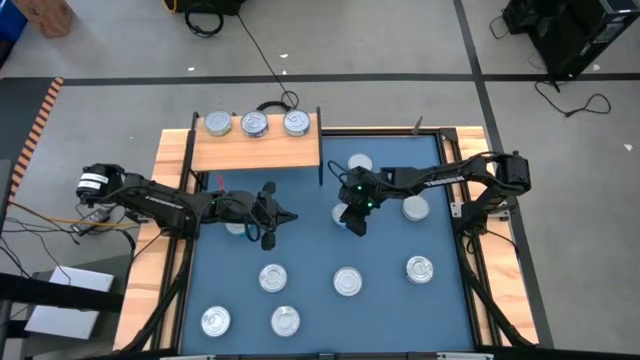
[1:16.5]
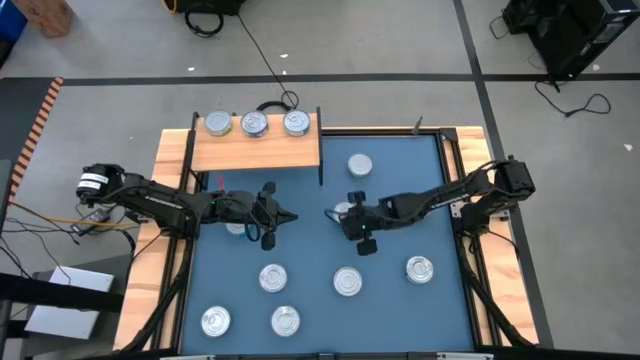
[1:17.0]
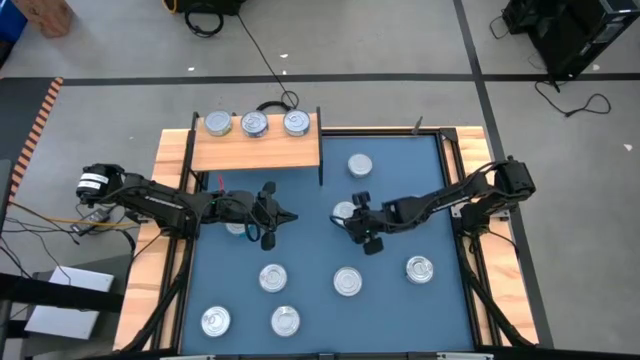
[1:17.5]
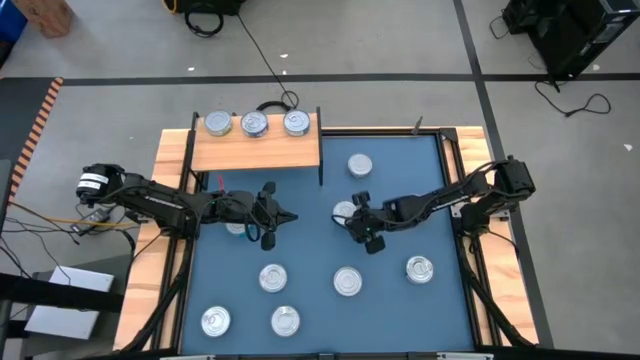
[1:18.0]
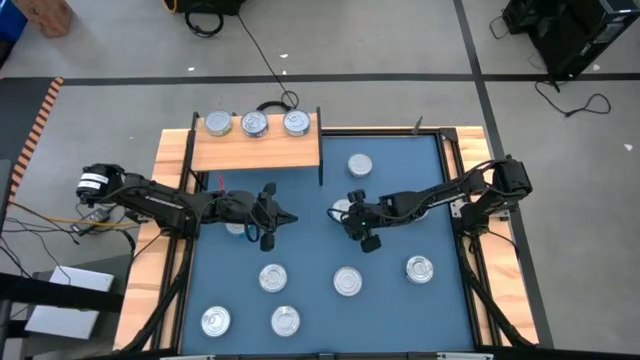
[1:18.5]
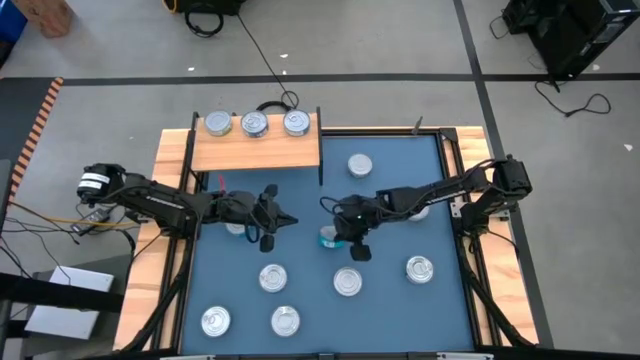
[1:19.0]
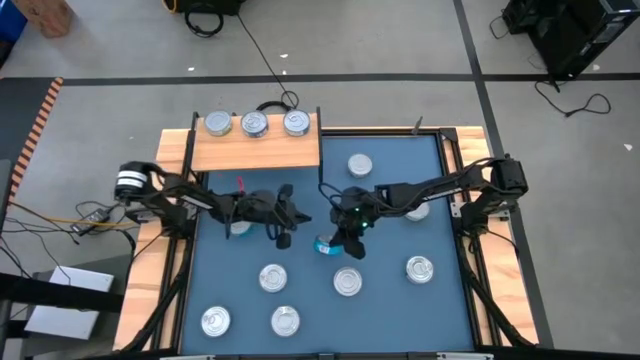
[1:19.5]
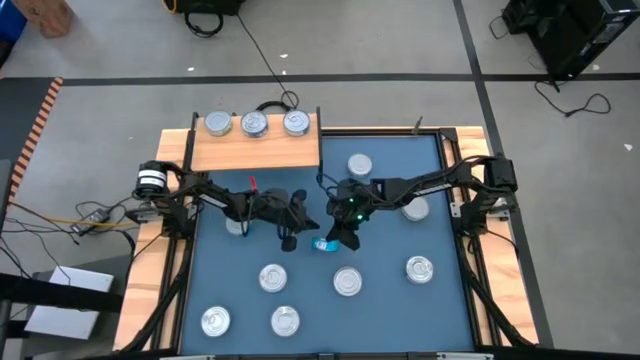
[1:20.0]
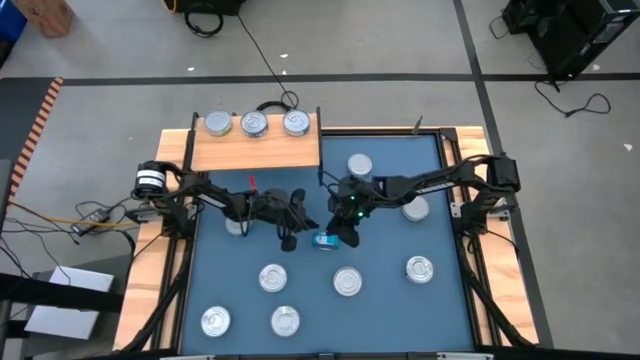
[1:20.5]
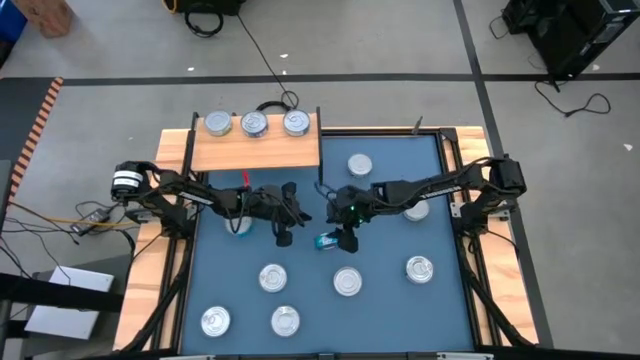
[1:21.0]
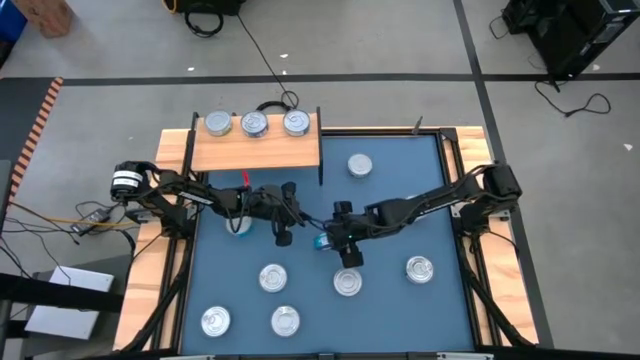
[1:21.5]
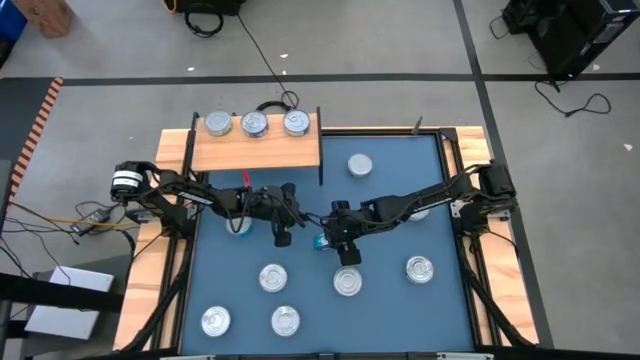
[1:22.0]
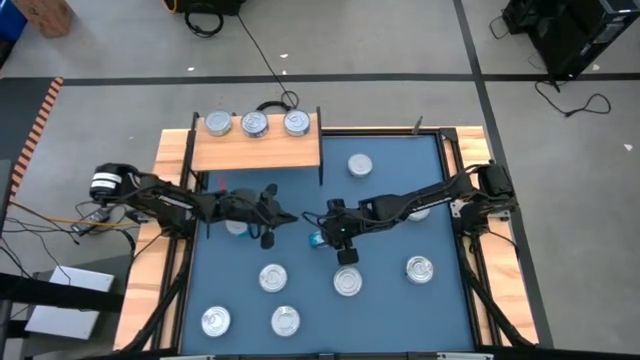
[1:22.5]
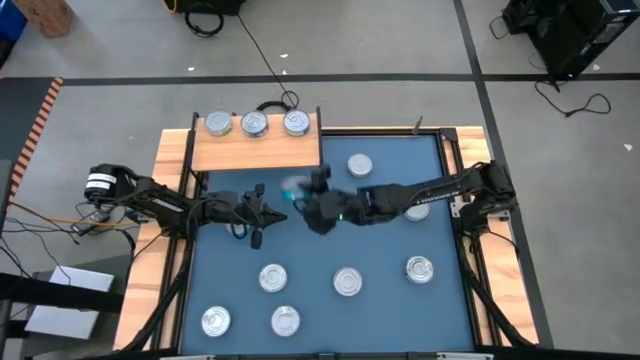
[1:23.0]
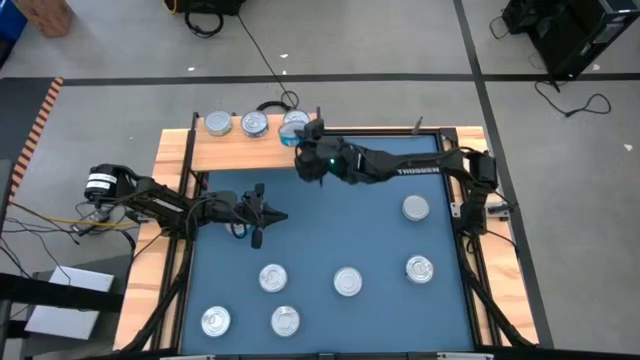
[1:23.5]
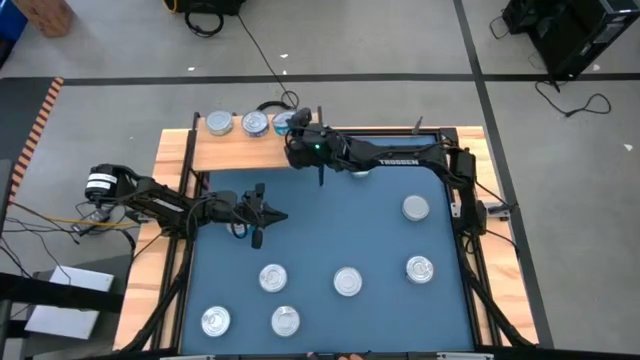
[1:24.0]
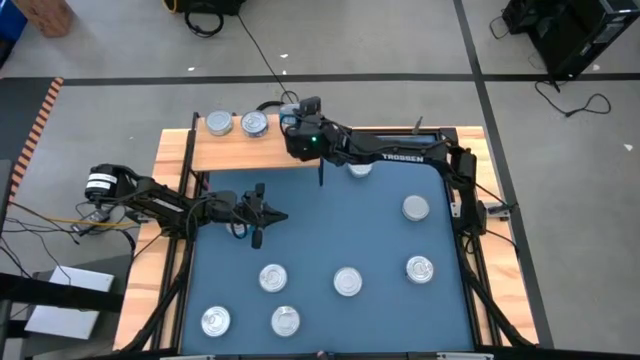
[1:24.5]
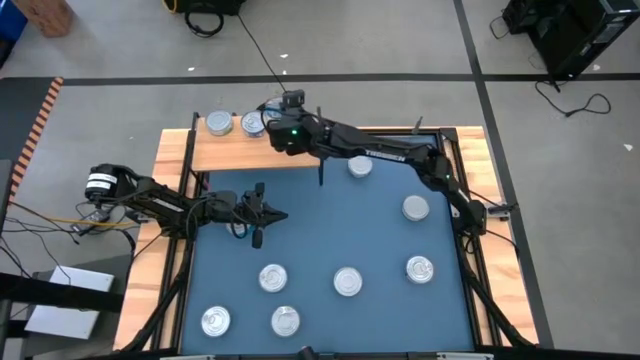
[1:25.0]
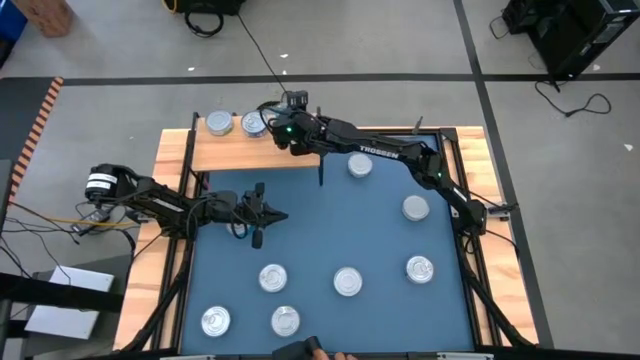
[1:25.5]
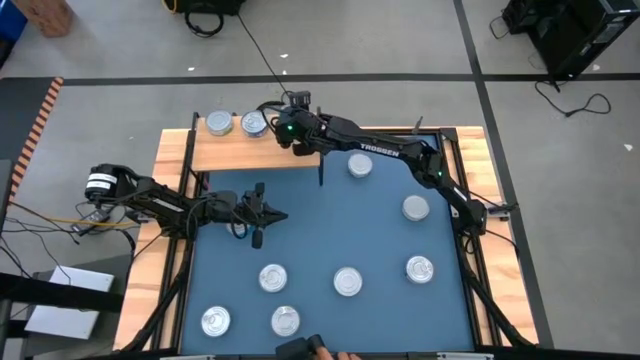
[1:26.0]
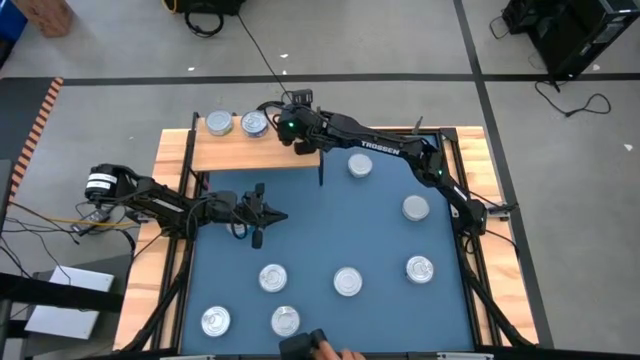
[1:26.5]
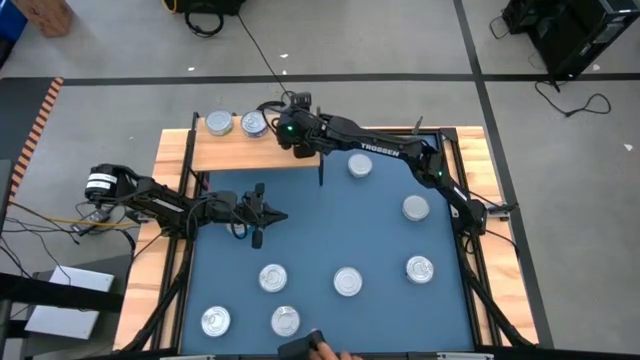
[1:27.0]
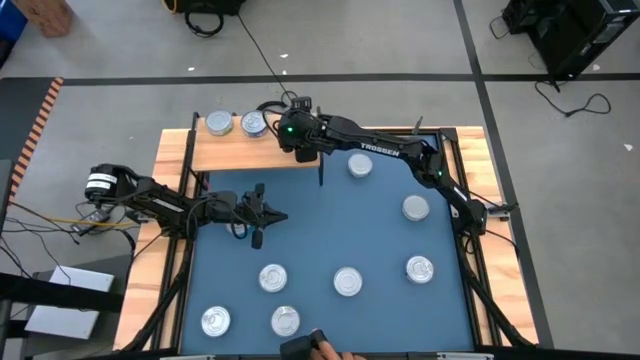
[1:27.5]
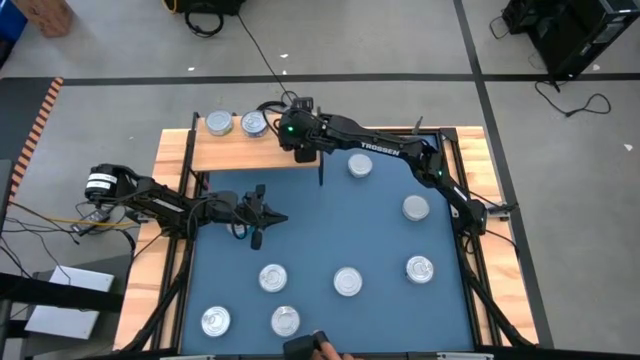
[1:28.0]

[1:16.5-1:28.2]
Task: Stack canned seafood by type on shelf
Stack the yellow blue tuna can on top of the yellow blue tuna can on the shelf

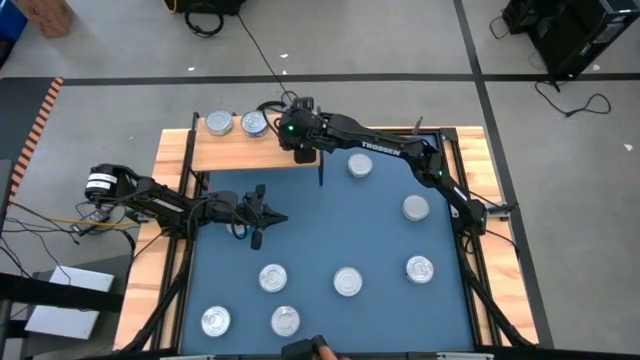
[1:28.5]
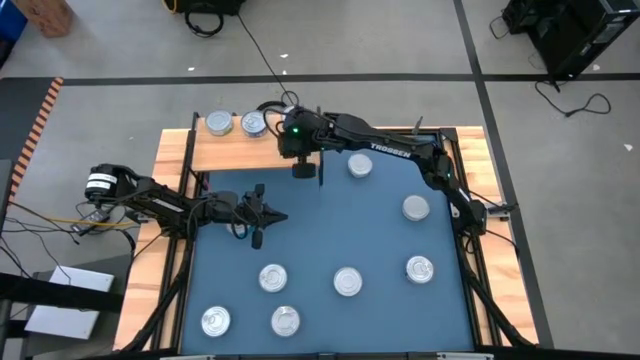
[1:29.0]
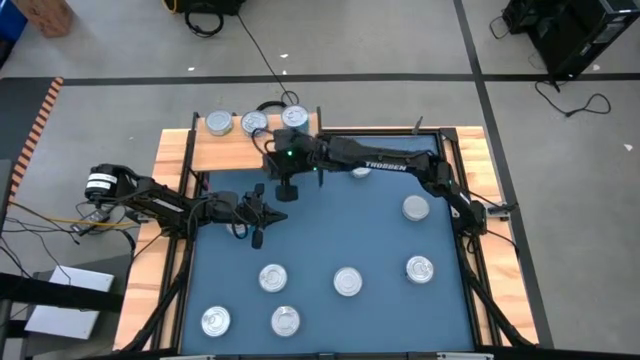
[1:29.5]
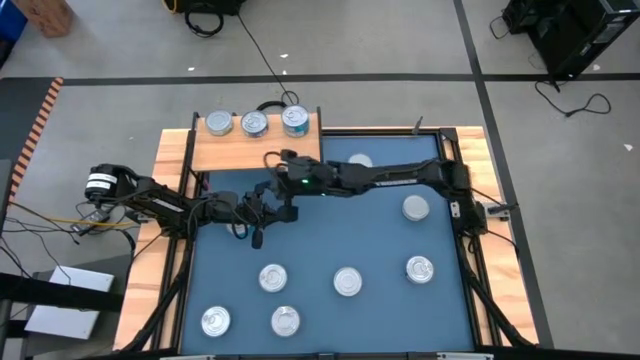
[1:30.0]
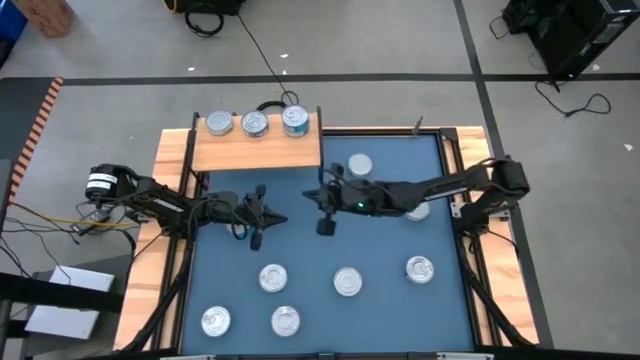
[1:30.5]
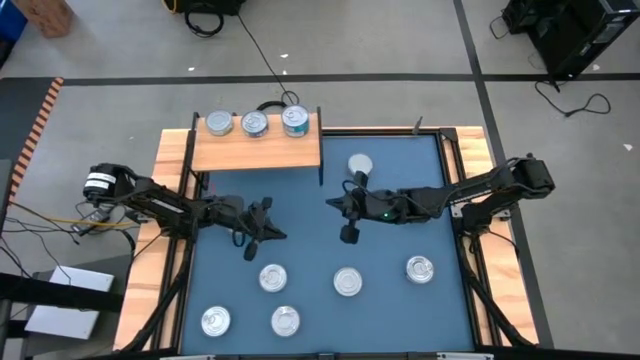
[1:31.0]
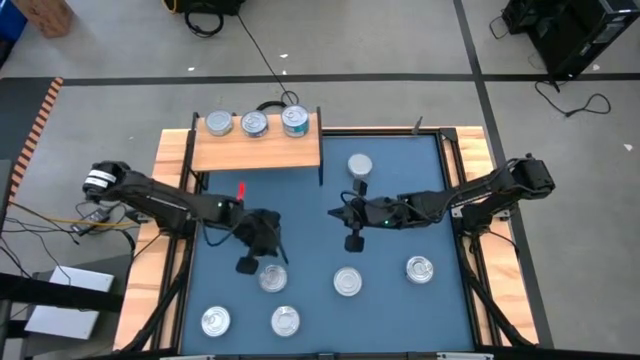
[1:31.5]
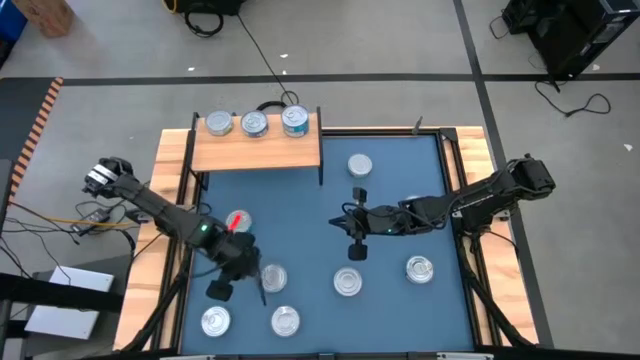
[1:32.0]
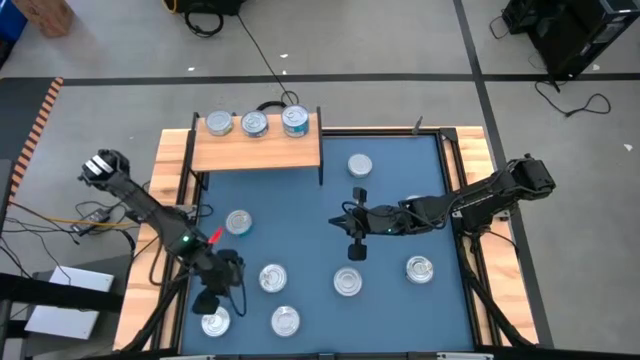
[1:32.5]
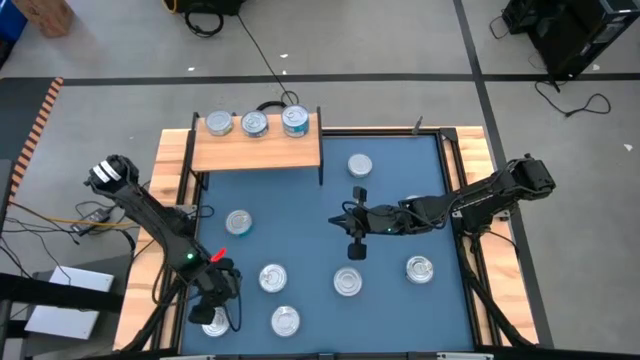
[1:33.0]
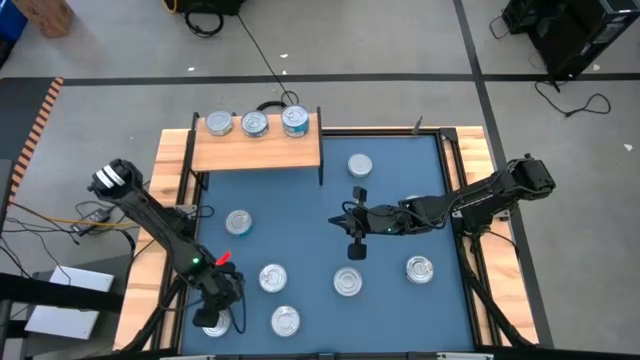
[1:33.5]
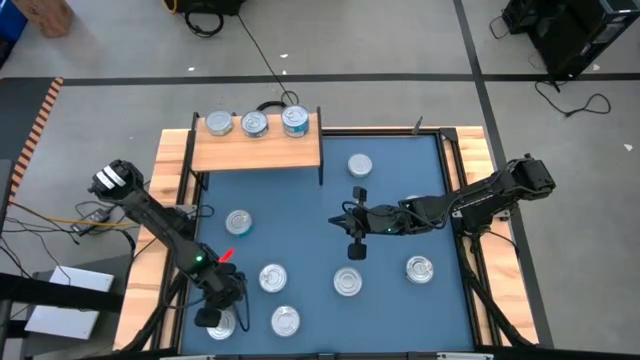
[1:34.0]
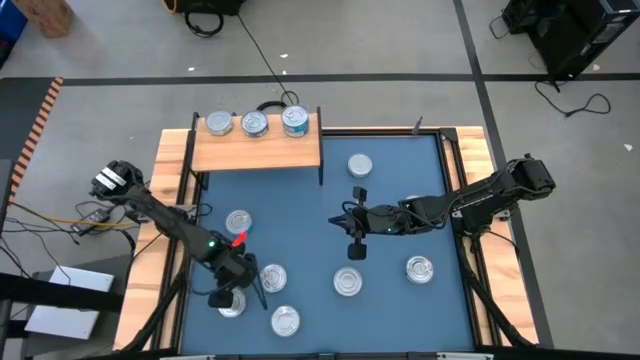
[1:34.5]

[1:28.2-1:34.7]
Stack the blue tuna can on top of blue tuna can on the shelf
